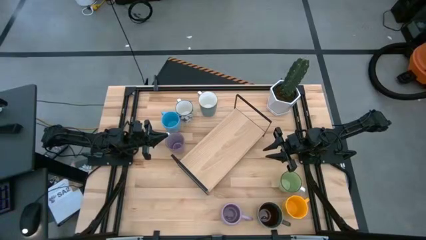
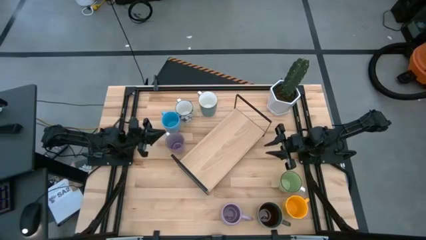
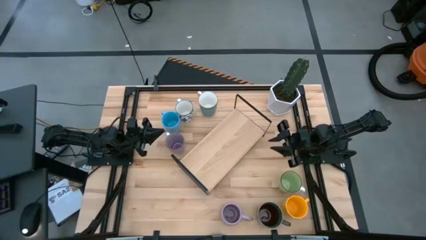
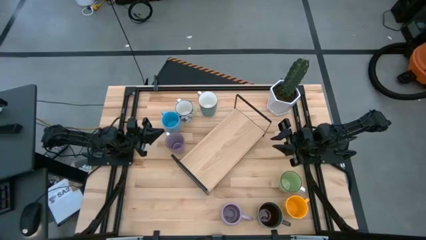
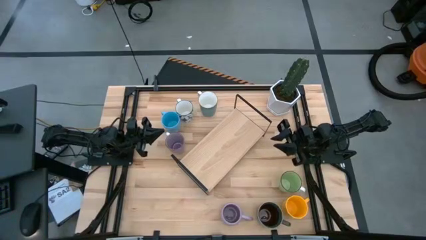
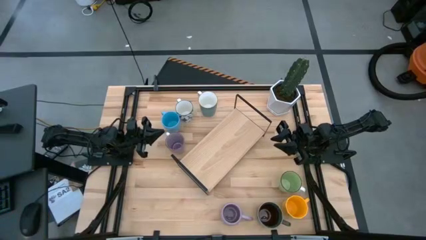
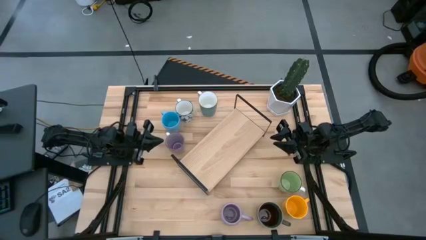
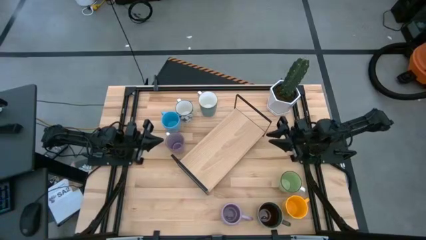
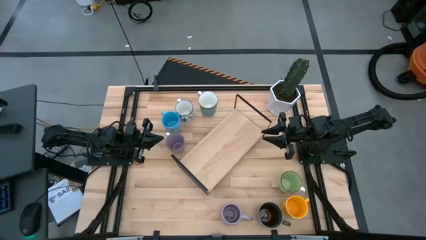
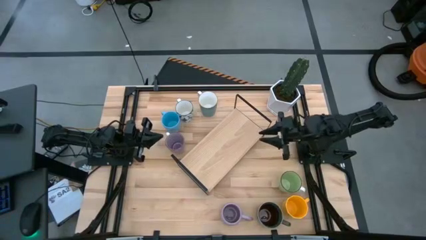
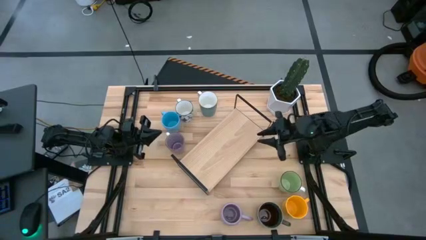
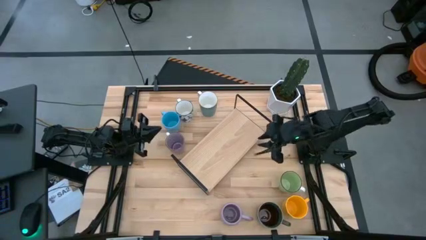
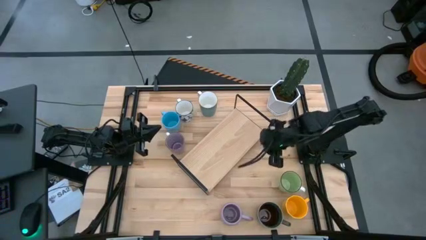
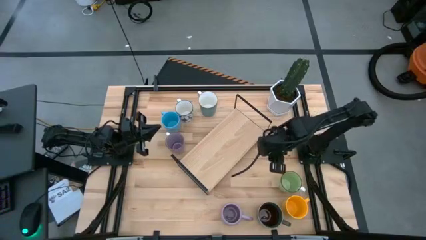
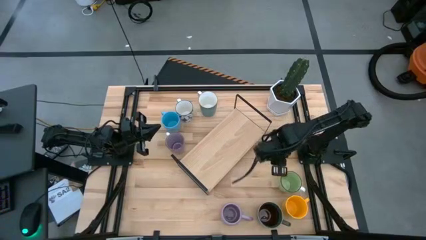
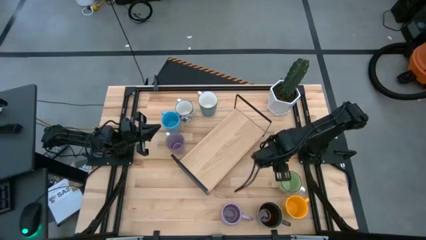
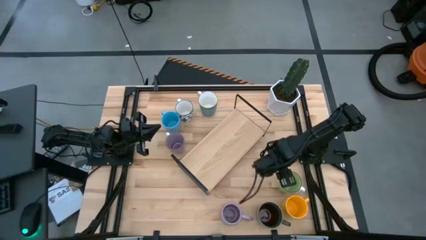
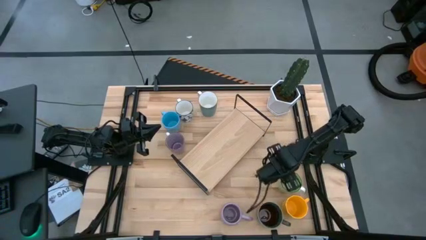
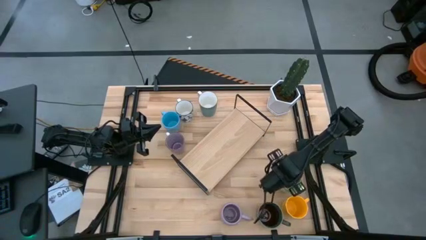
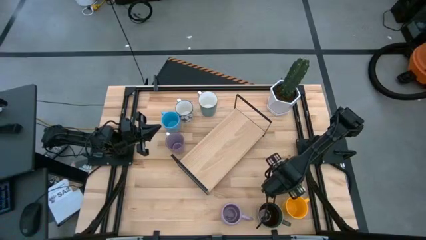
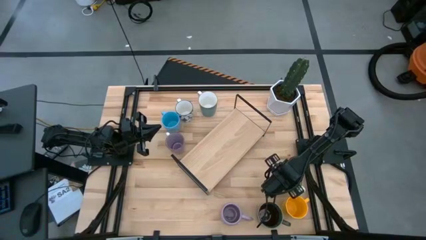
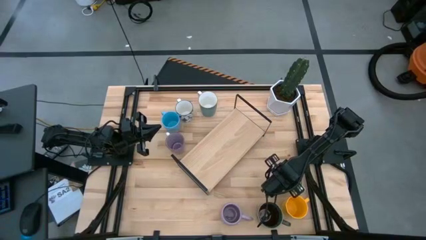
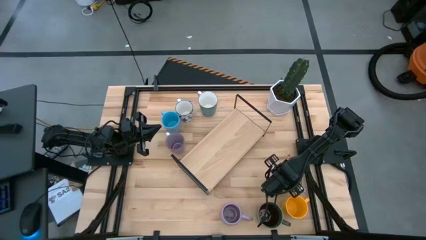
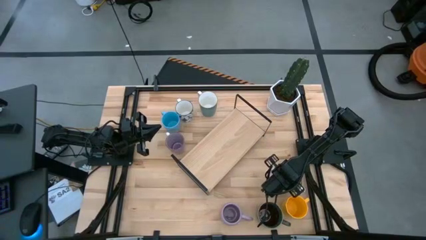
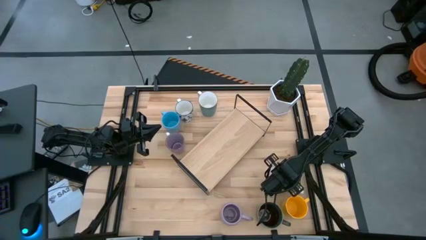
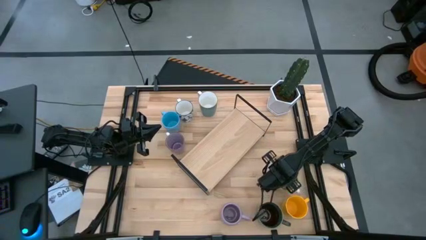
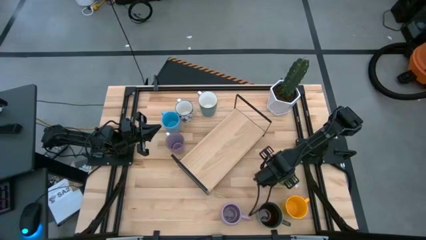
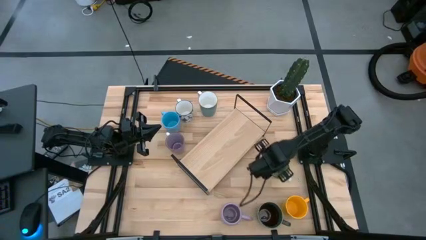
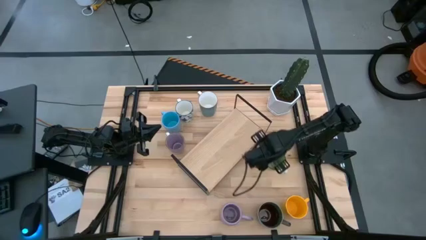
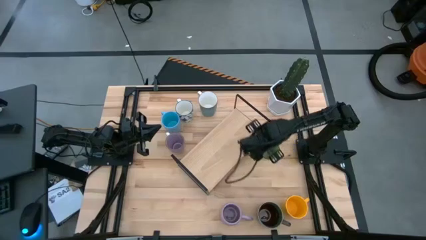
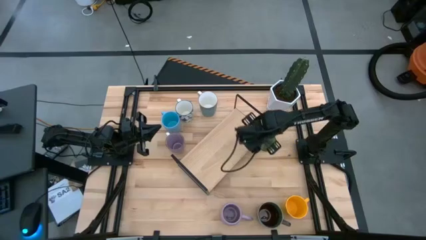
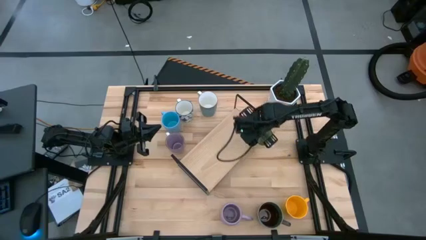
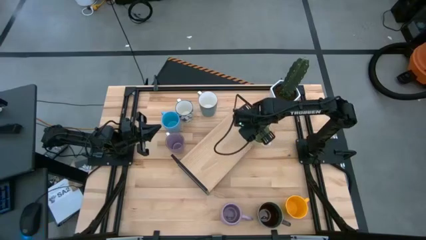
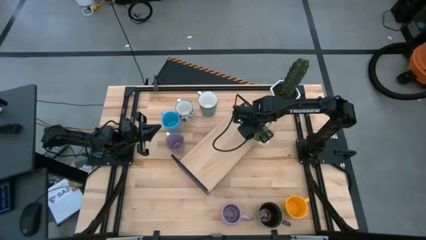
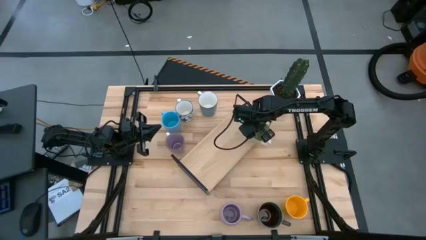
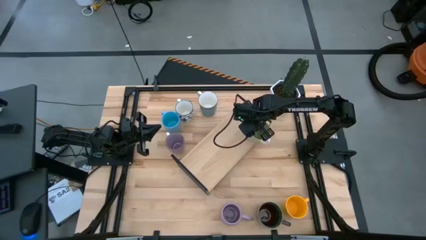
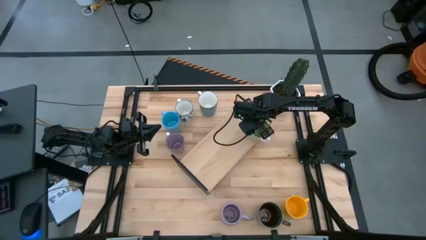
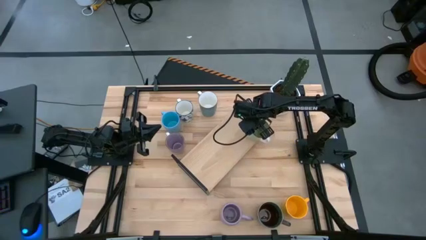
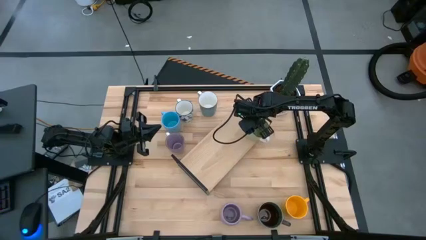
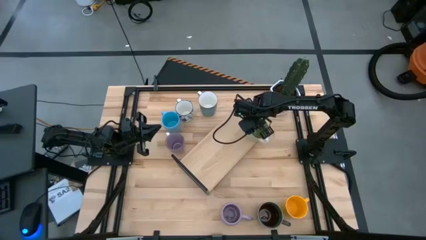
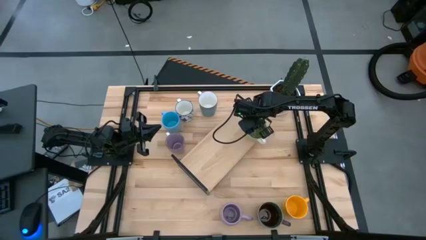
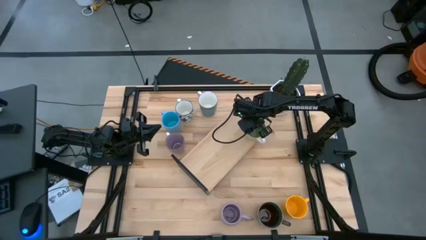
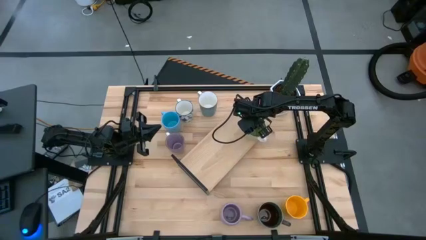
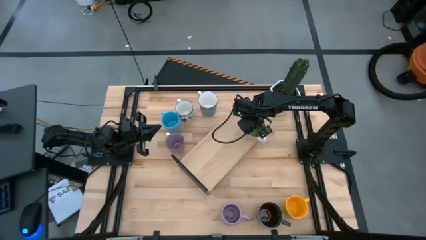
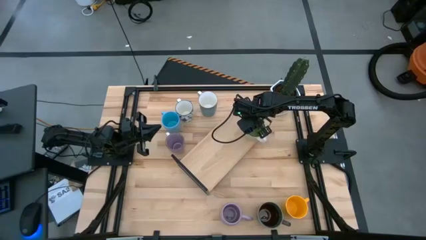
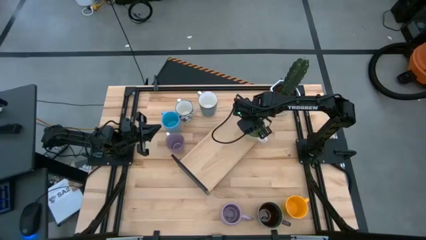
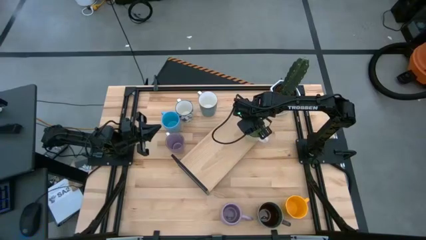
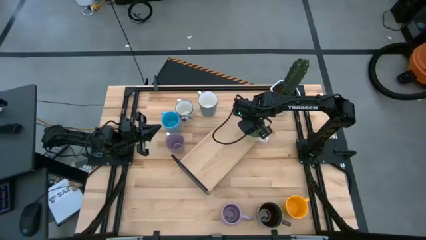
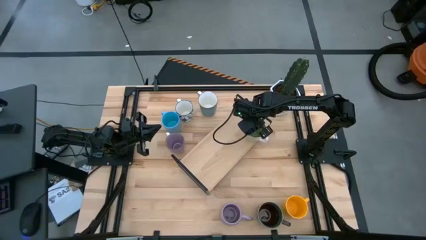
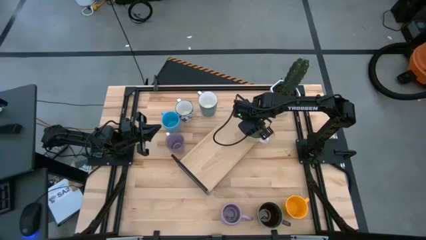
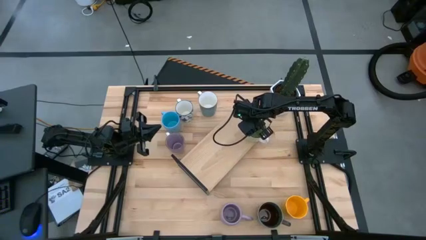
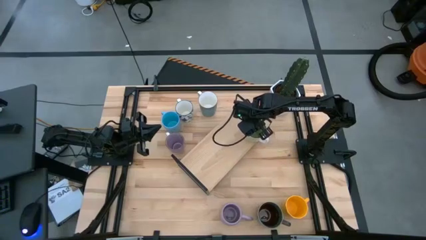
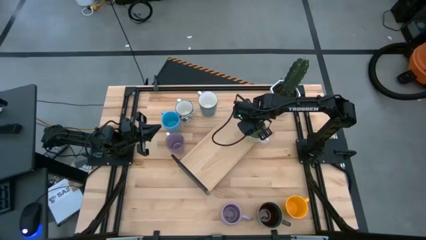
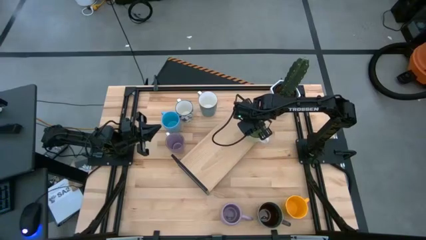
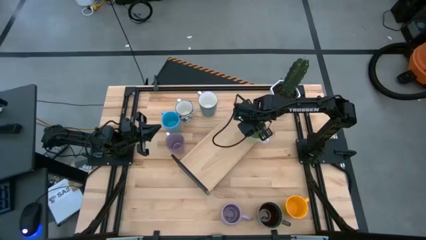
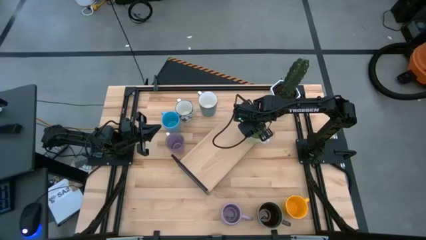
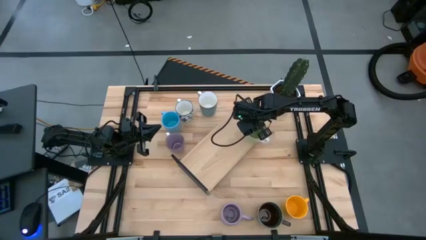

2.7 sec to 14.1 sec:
Task: Place coffee mugs
Put the green cup on the shelf

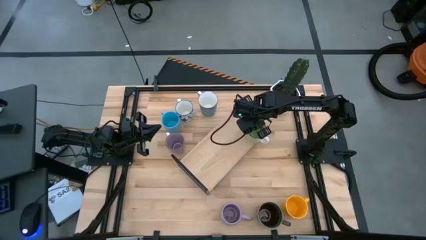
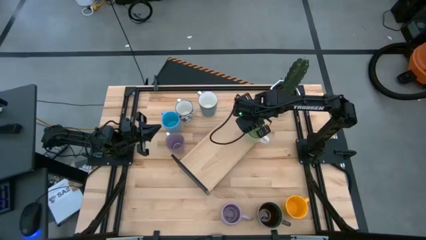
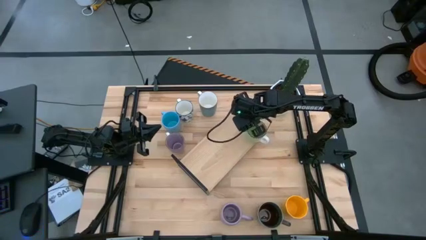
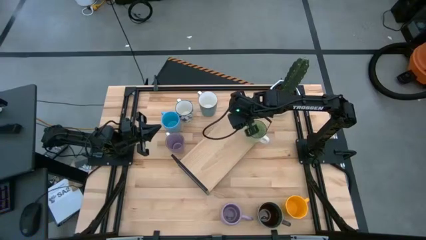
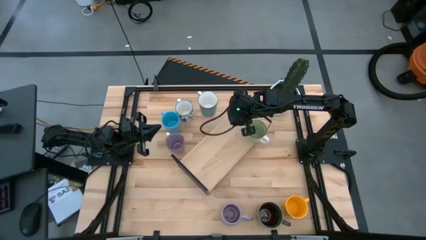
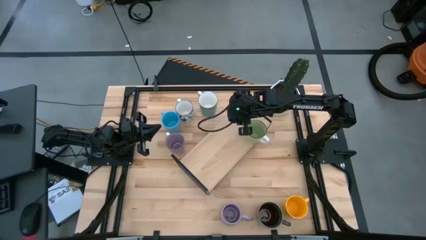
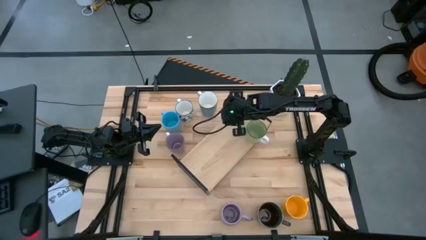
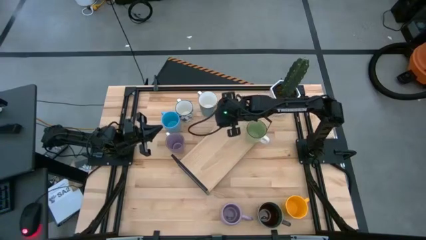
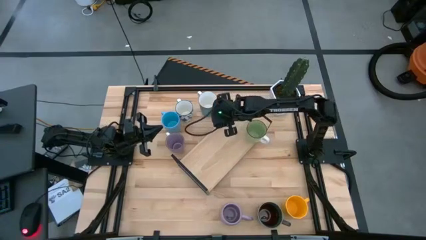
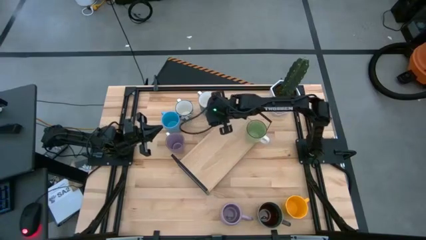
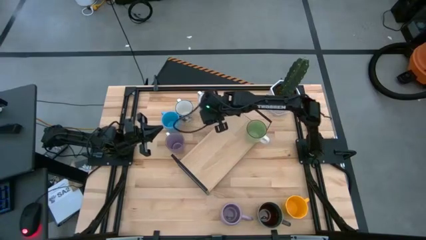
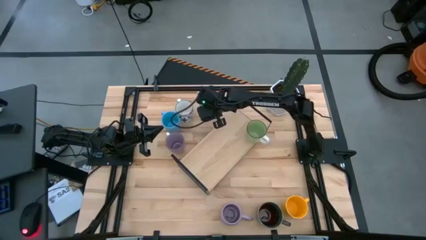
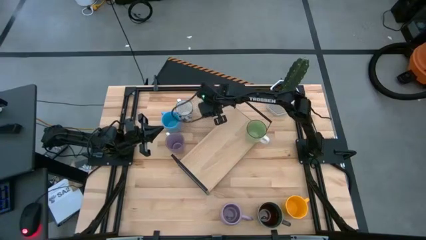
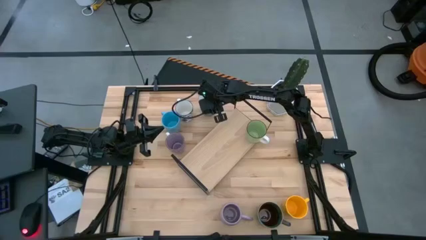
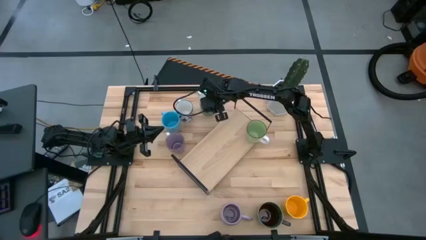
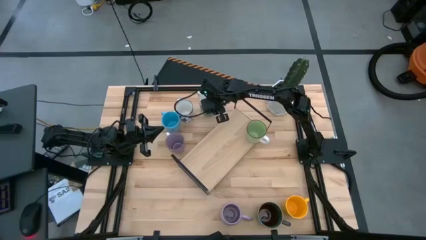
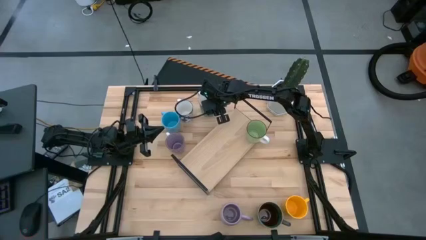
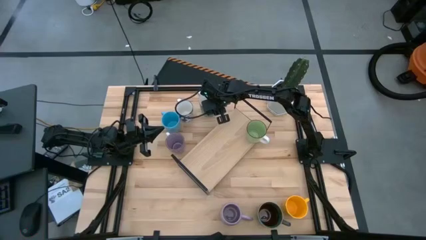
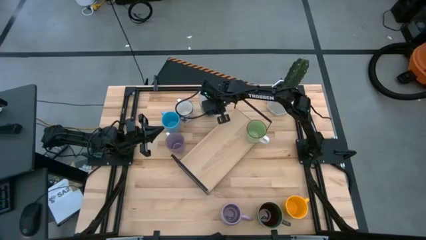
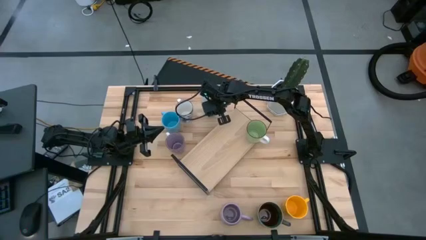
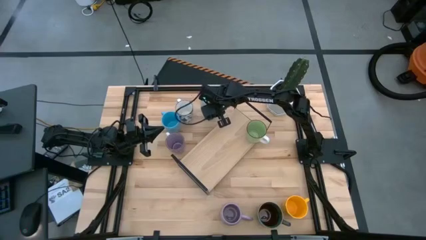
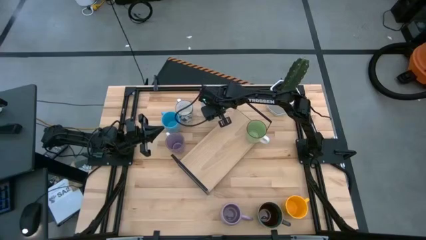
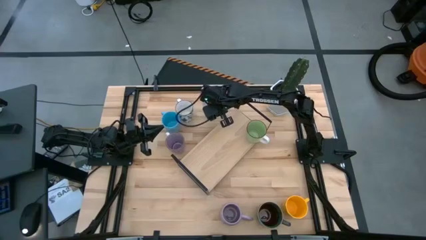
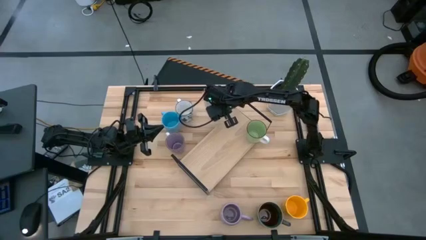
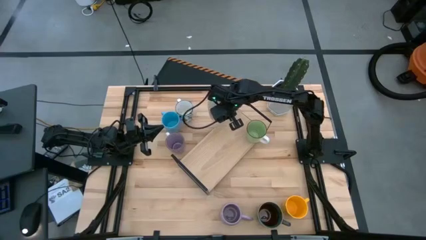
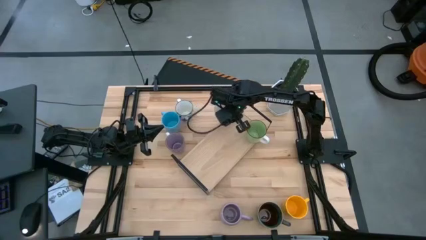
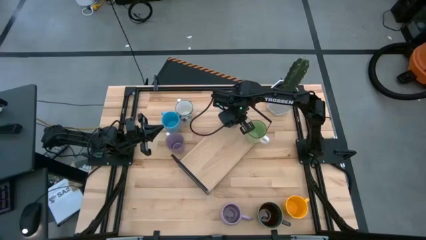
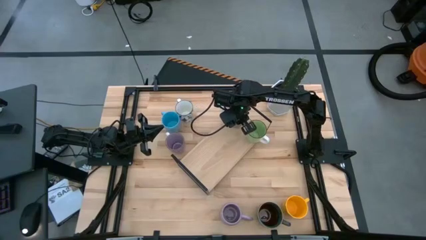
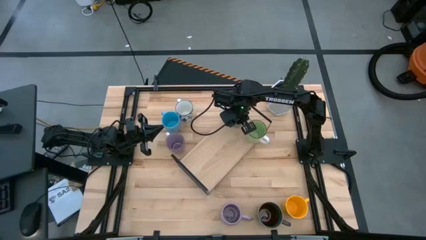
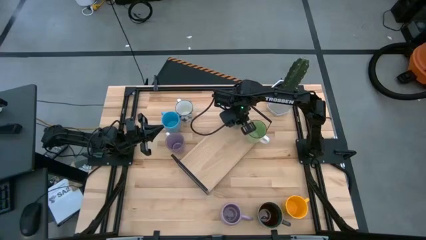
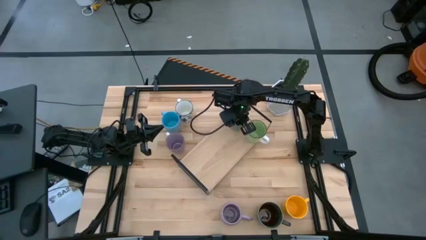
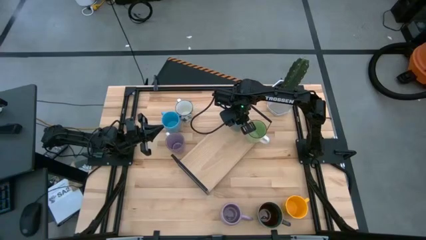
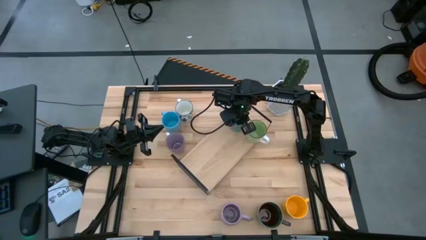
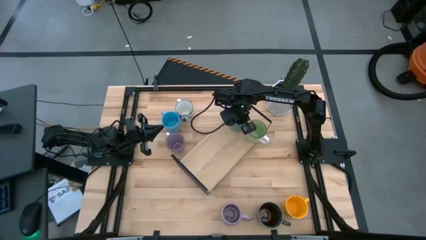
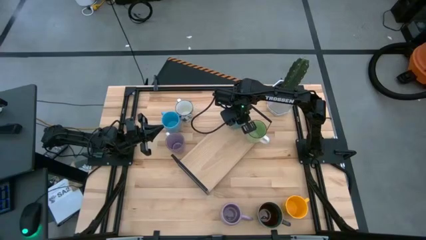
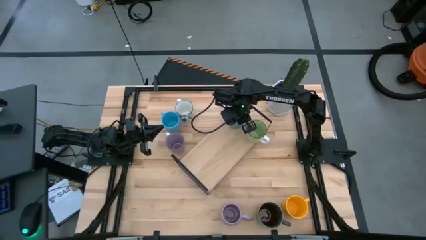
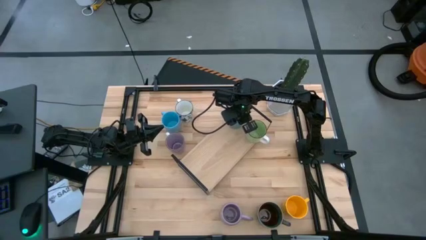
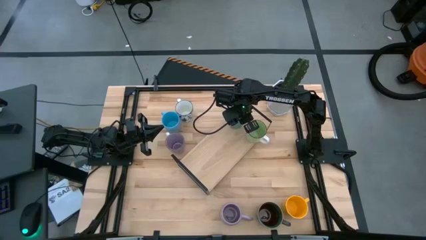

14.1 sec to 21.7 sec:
Put the light green cup on the shelf
